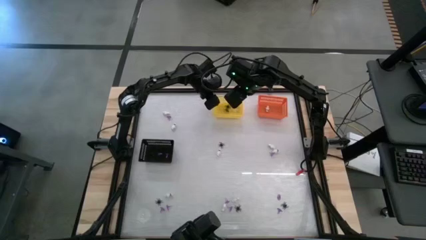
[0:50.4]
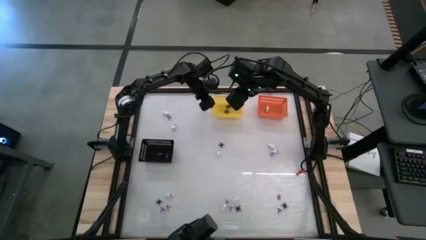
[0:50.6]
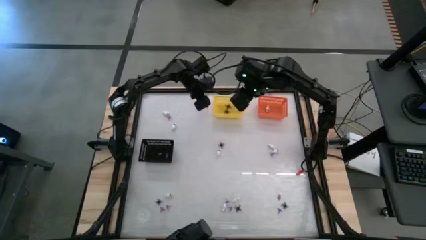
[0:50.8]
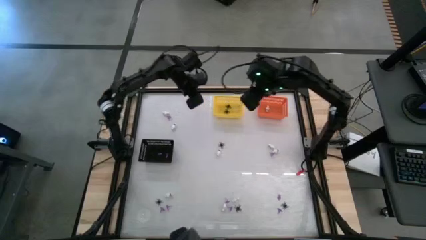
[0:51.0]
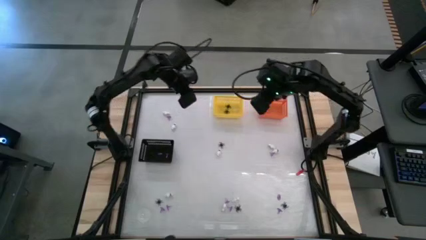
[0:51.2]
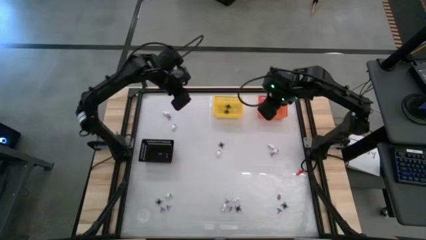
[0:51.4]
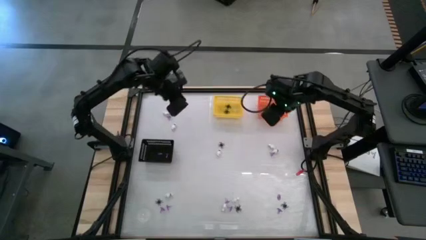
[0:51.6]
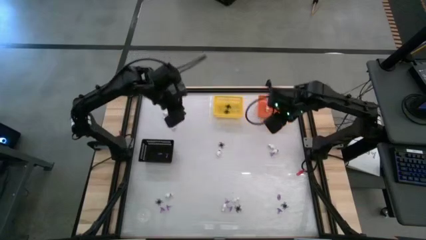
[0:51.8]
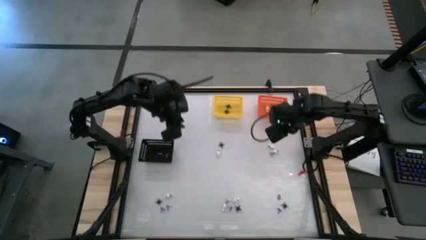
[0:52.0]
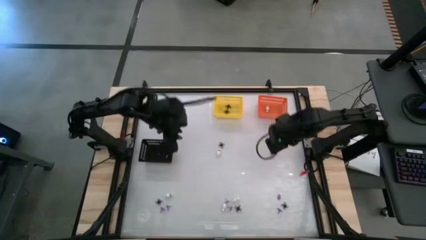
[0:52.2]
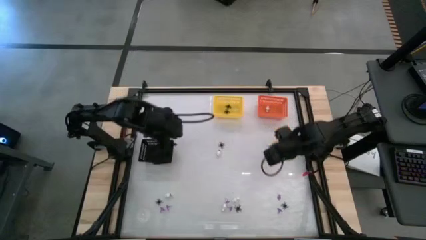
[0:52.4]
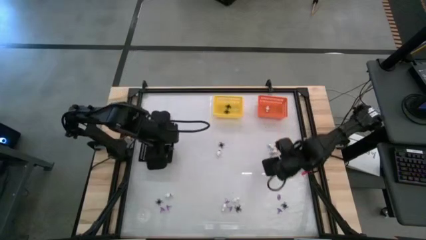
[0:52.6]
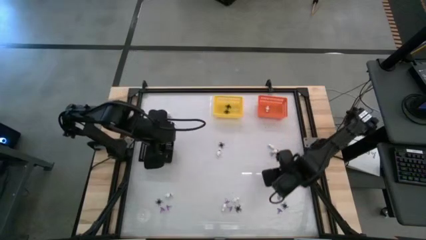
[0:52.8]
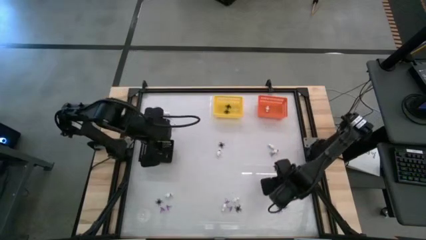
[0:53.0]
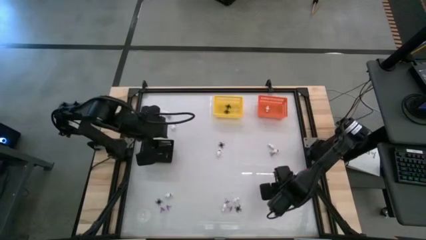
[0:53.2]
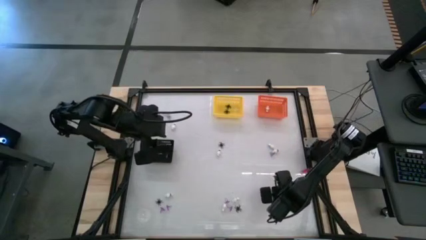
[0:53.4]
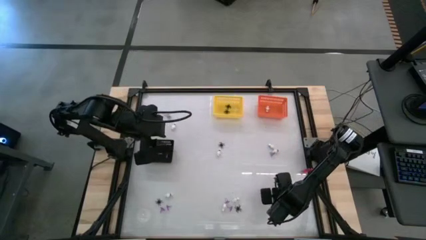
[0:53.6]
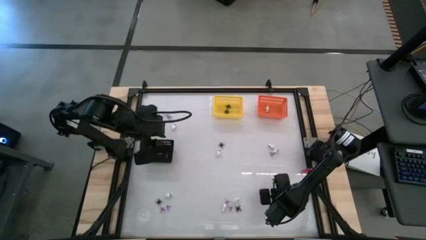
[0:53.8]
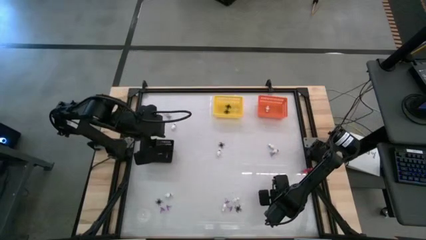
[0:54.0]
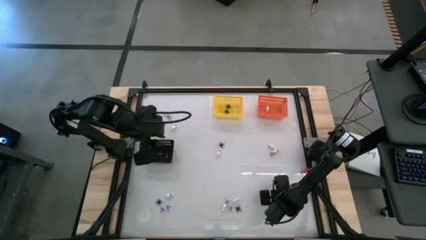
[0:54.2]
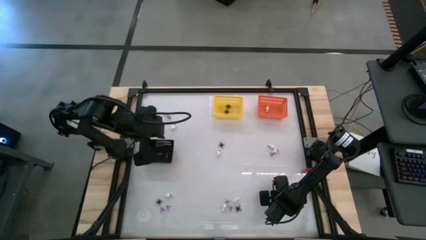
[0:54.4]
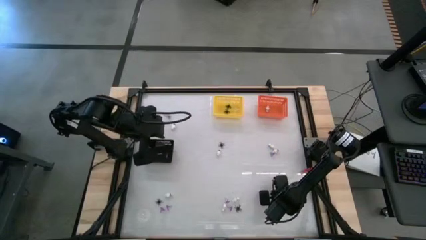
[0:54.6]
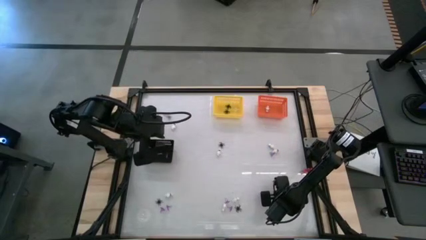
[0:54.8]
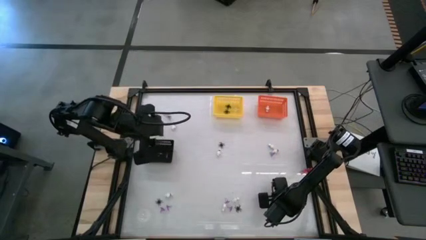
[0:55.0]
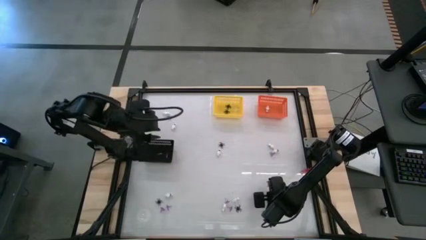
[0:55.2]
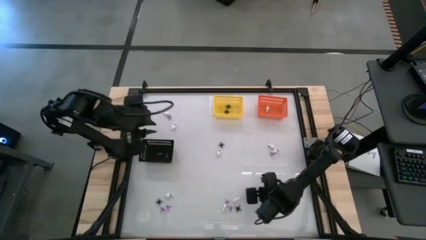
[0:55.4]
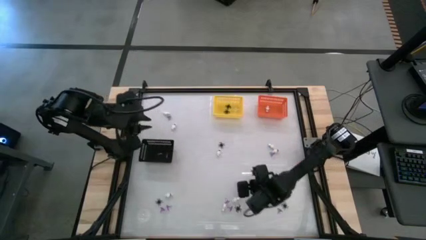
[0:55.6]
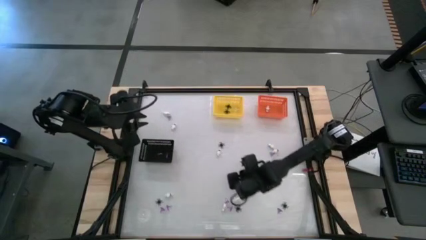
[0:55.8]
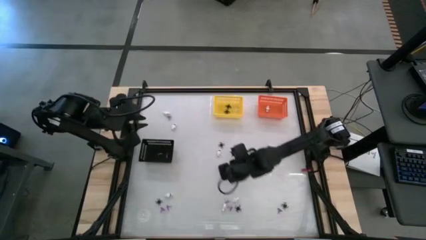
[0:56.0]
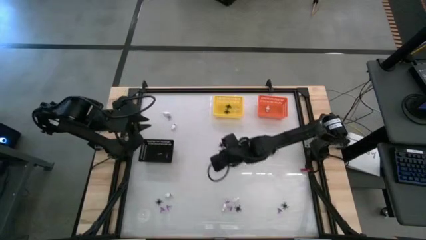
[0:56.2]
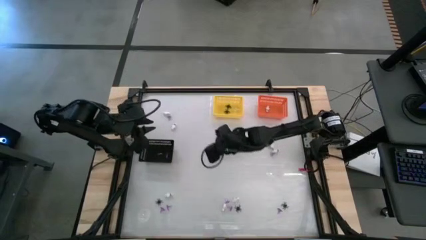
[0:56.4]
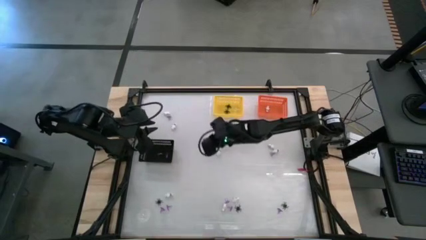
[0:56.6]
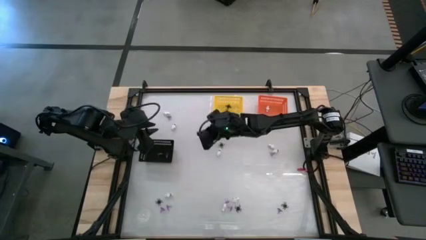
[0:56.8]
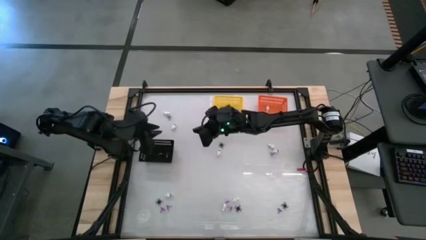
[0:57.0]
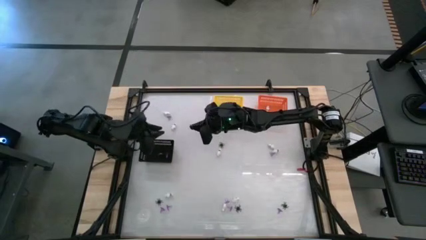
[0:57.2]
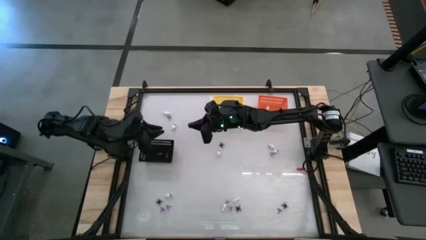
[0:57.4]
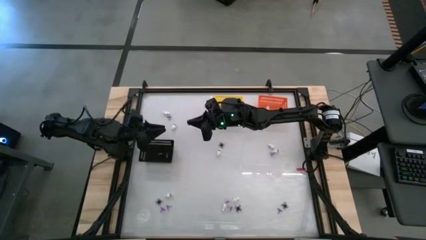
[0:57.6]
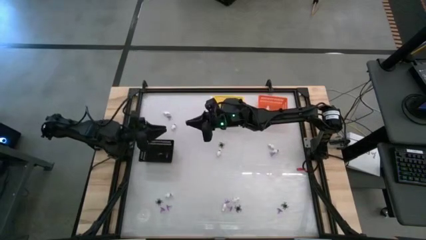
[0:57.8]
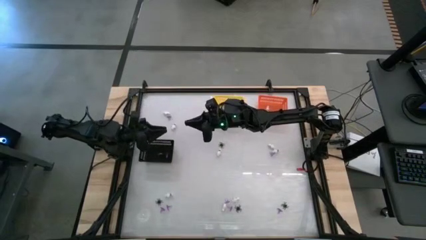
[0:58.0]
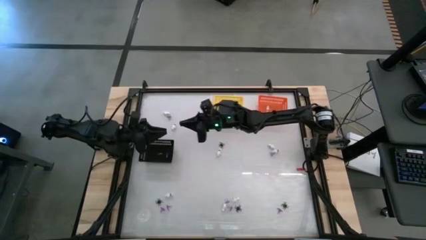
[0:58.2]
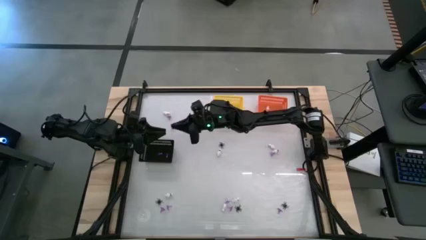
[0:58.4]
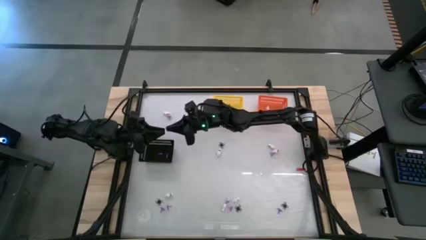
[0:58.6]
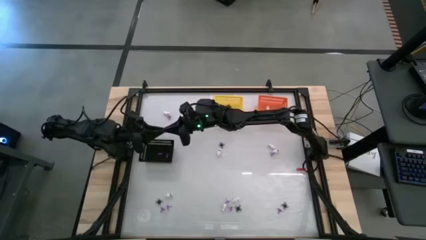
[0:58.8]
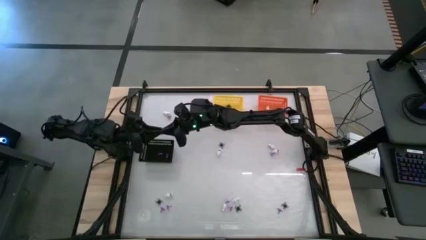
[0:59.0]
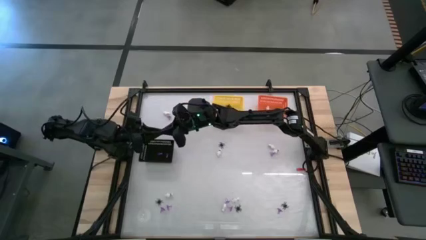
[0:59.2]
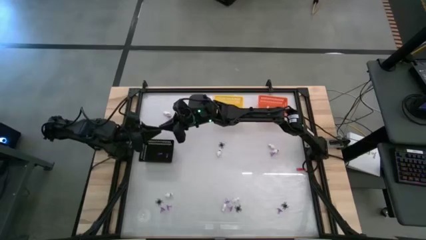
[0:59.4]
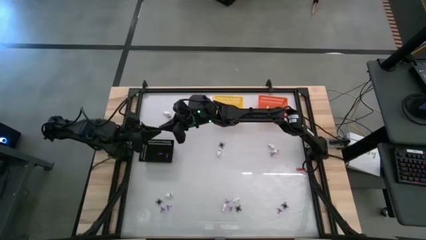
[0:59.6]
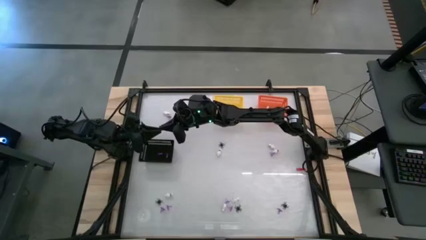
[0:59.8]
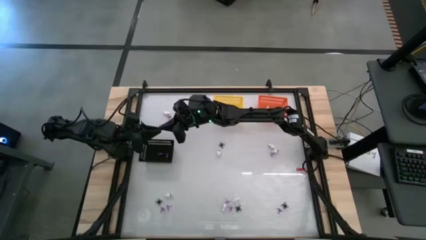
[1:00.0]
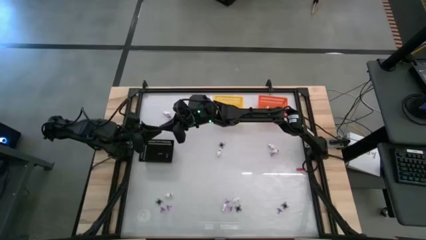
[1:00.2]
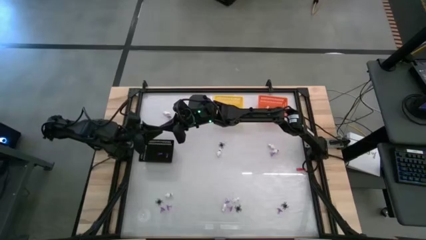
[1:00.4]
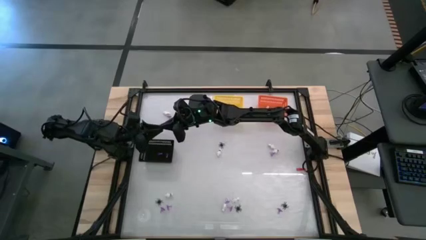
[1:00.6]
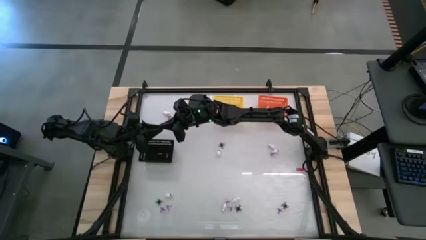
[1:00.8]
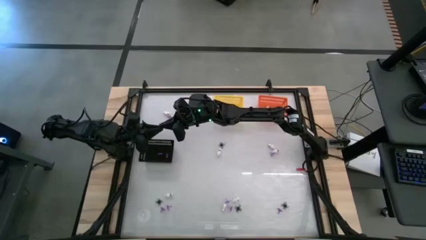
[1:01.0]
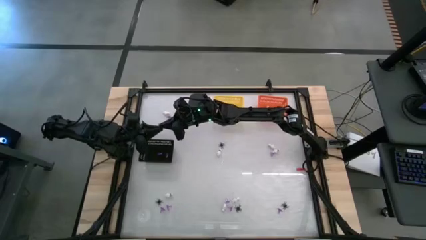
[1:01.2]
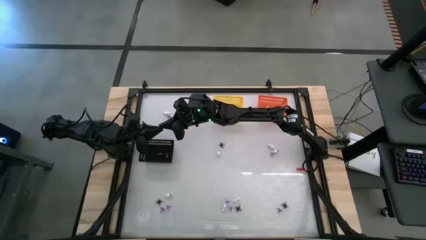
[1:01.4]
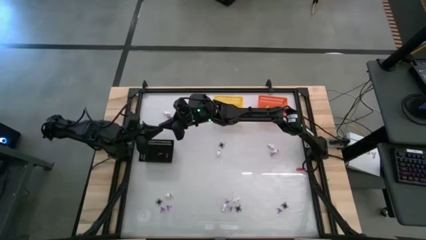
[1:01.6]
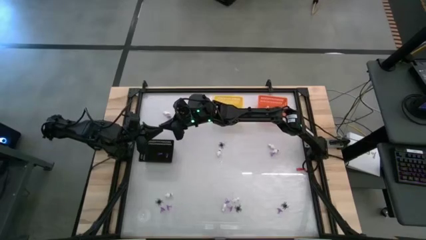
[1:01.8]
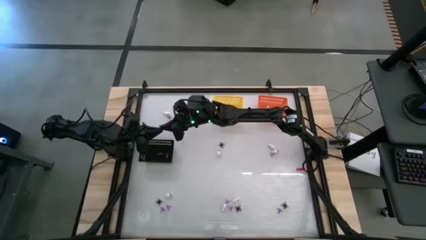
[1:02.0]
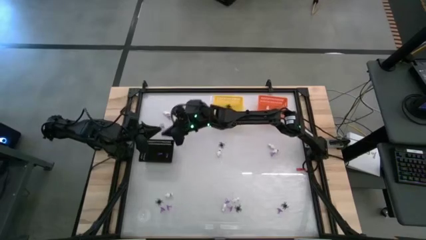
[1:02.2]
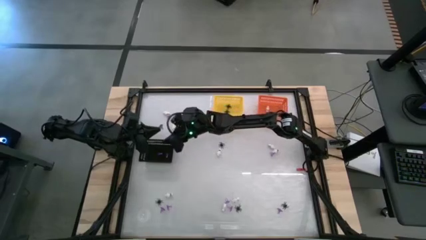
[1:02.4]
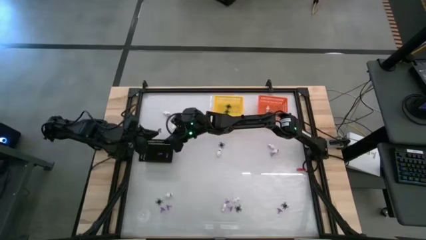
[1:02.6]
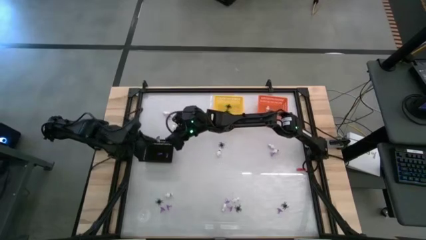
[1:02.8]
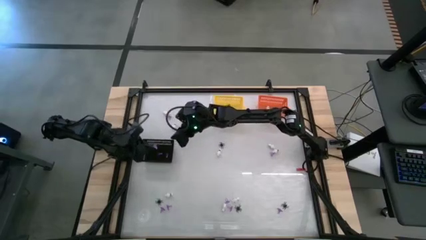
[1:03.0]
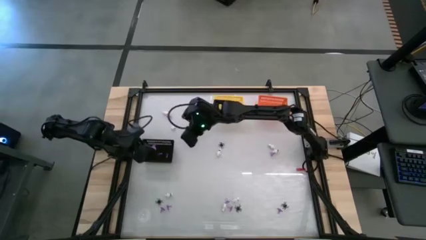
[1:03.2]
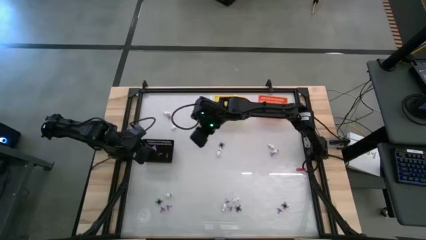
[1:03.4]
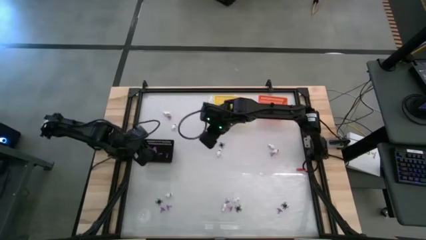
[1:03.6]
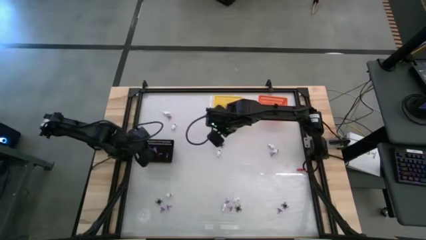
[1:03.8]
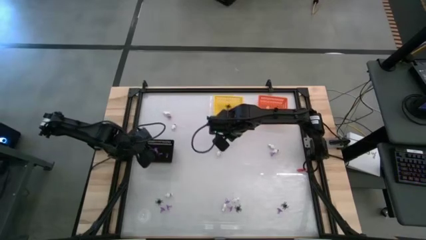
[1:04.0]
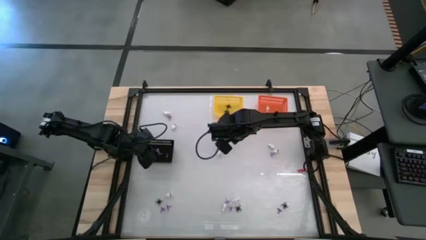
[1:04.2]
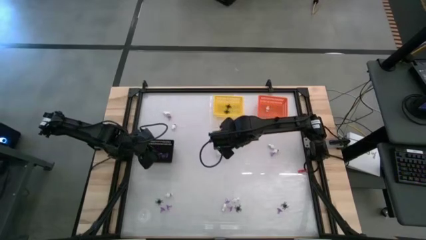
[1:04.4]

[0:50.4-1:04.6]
Task: Sort Halloween decoration
Put the purple witch hat toy into the black bin

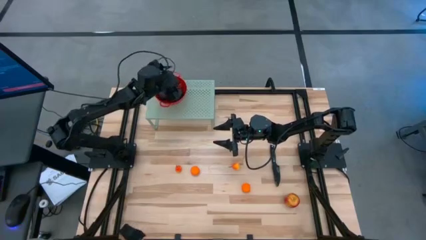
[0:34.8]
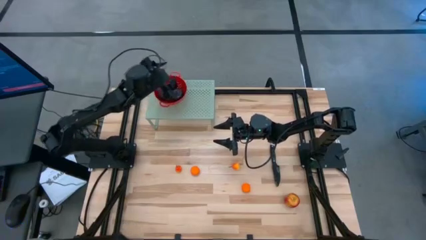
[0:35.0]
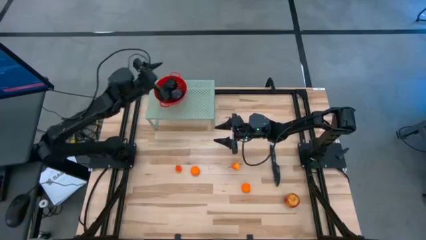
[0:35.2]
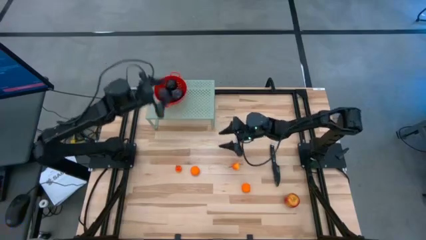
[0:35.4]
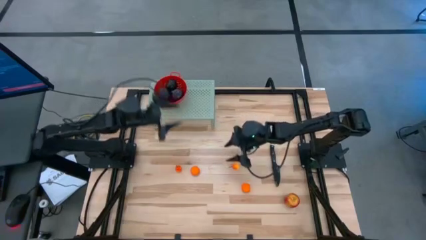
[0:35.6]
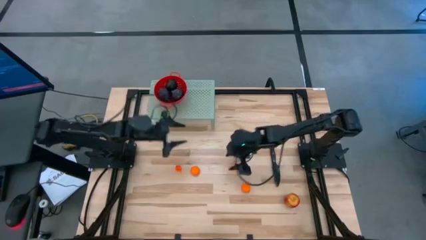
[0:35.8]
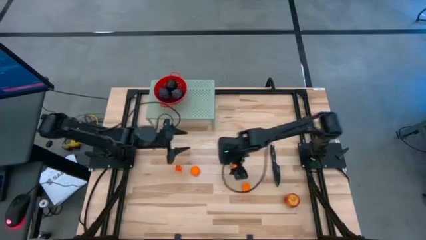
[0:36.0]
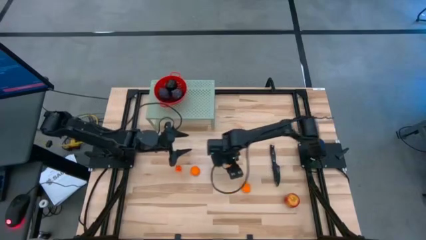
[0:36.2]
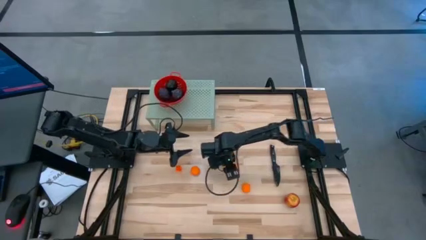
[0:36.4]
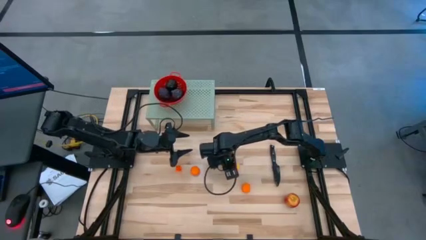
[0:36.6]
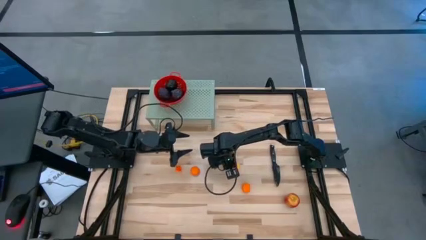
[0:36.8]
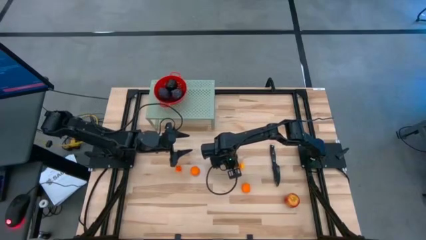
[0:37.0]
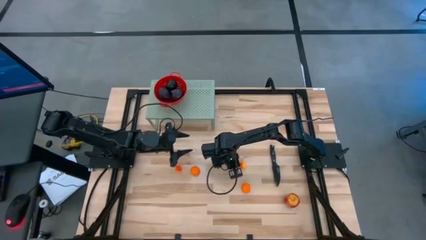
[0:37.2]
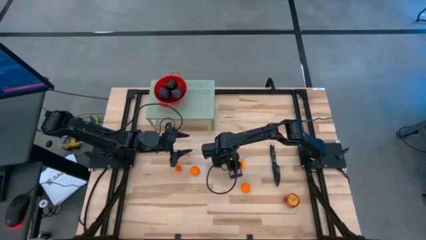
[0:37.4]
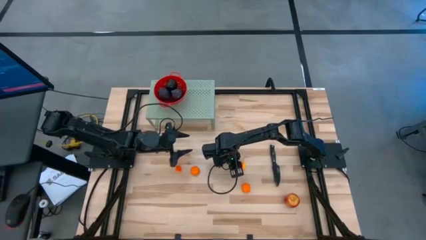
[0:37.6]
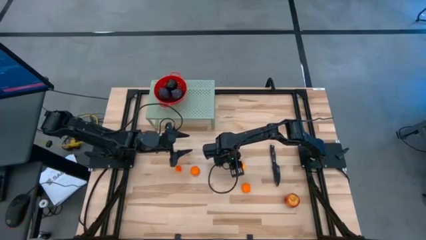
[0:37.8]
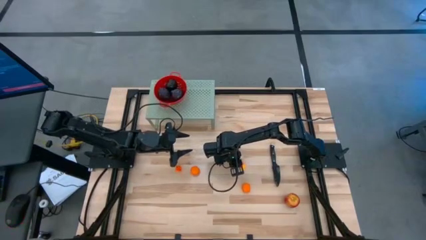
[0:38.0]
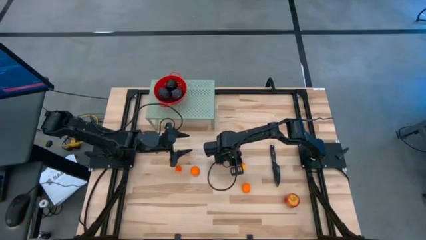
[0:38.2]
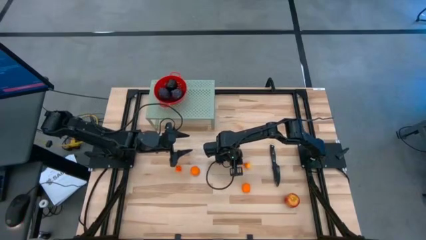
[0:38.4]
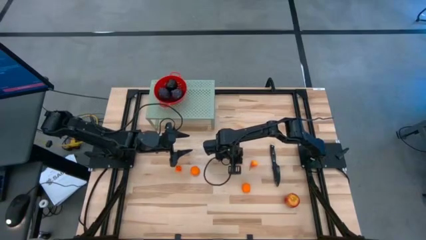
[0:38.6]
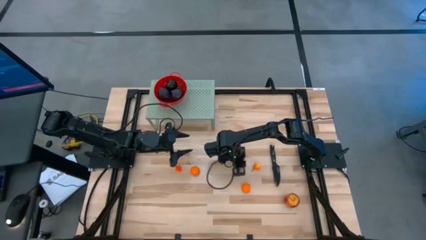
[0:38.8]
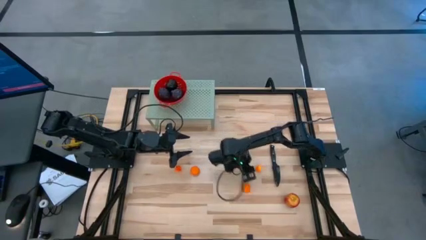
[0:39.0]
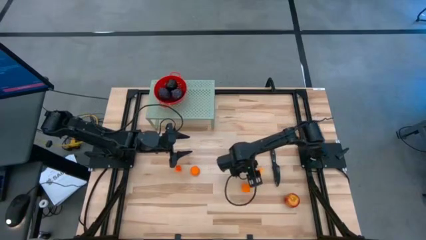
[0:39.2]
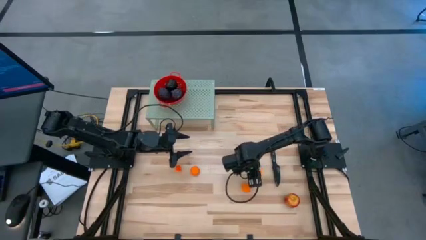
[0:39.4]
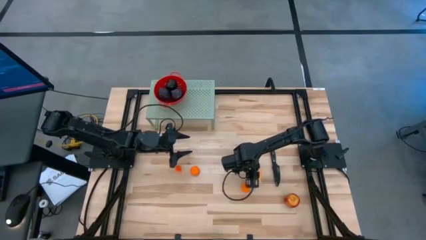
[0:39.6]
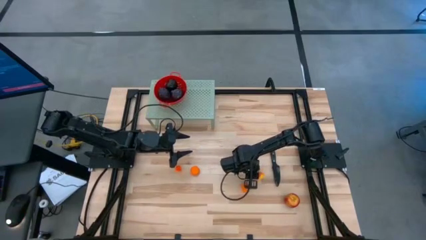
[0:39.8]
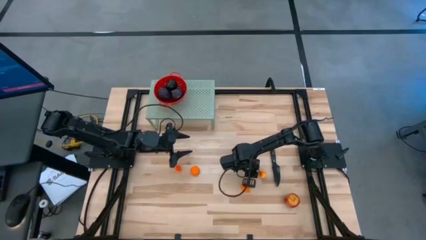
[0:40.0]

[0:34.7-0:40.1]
Task: Pick & Place Fruit
Put the right red and yellow pear into the red strainer bowl
